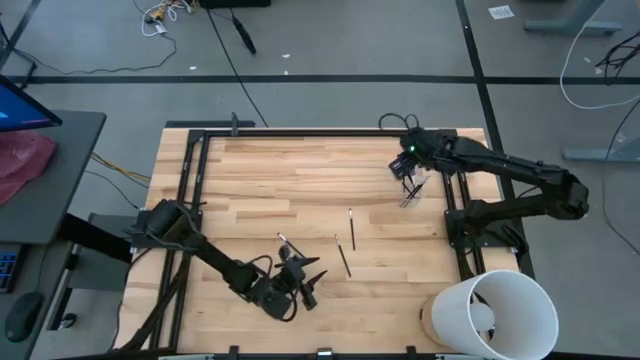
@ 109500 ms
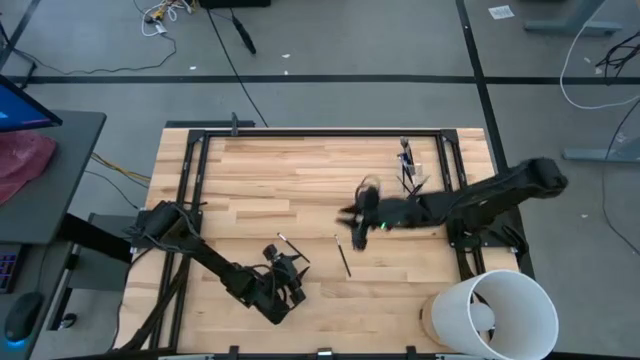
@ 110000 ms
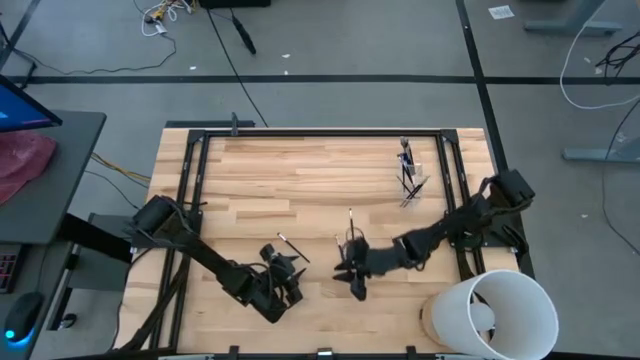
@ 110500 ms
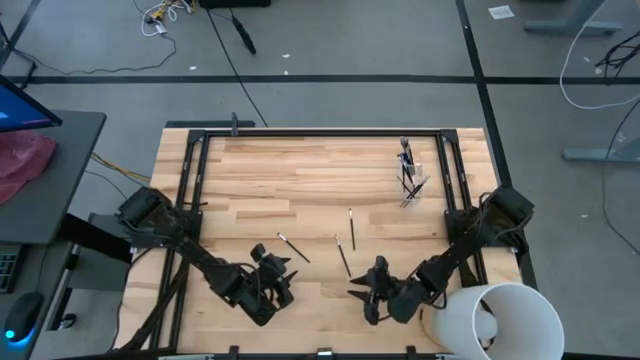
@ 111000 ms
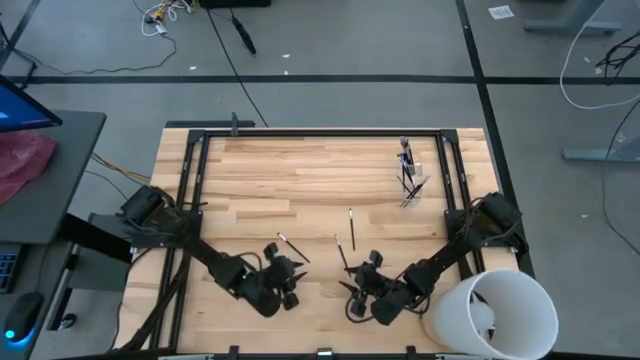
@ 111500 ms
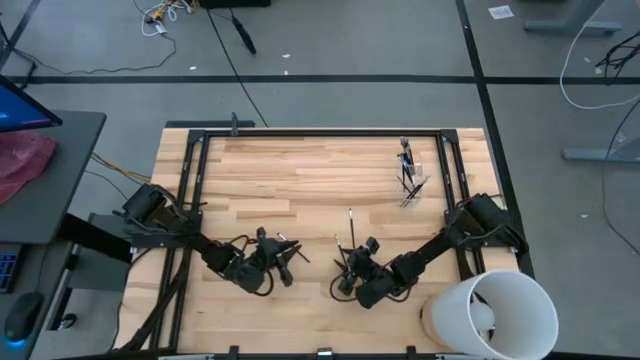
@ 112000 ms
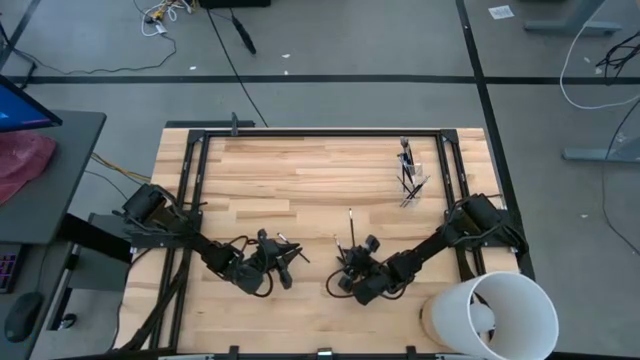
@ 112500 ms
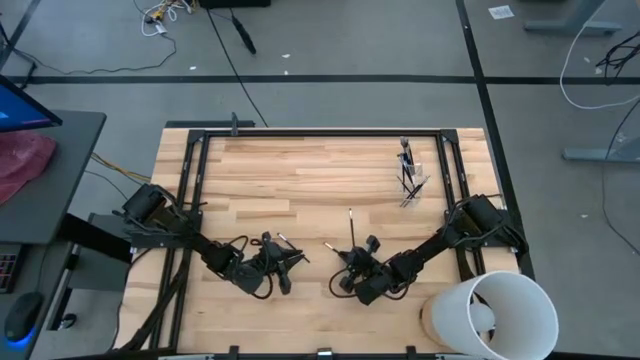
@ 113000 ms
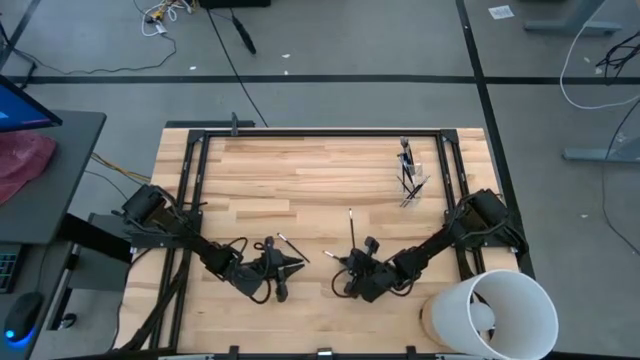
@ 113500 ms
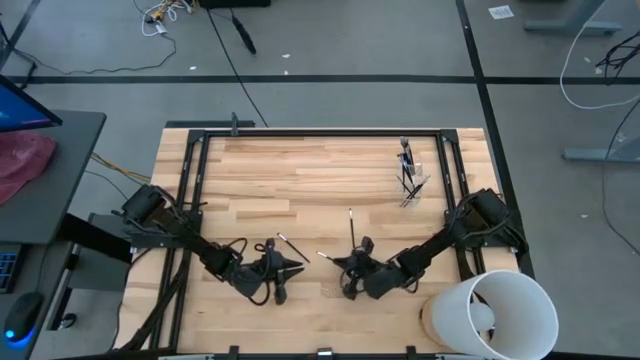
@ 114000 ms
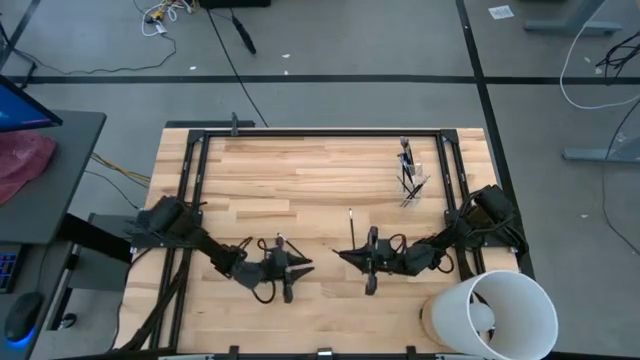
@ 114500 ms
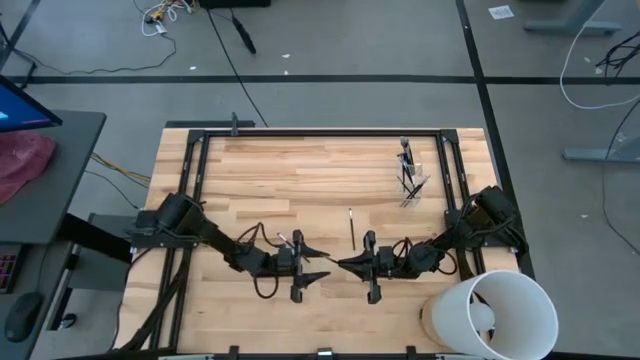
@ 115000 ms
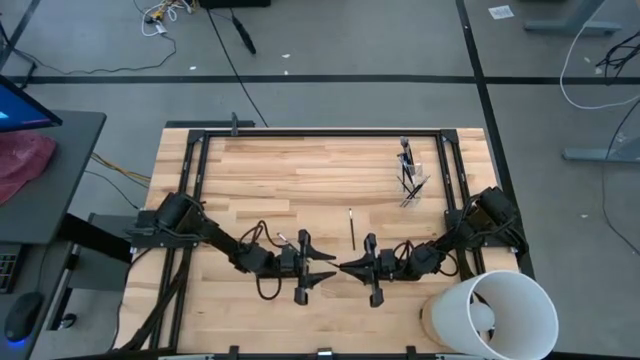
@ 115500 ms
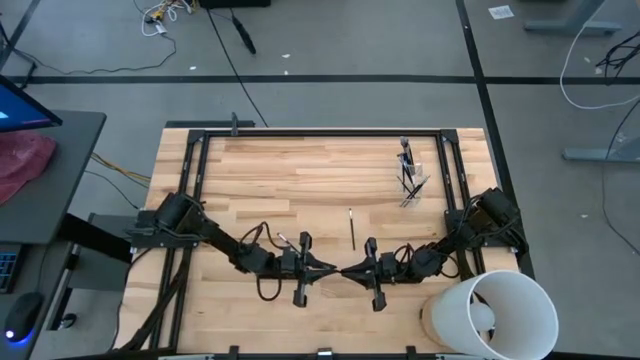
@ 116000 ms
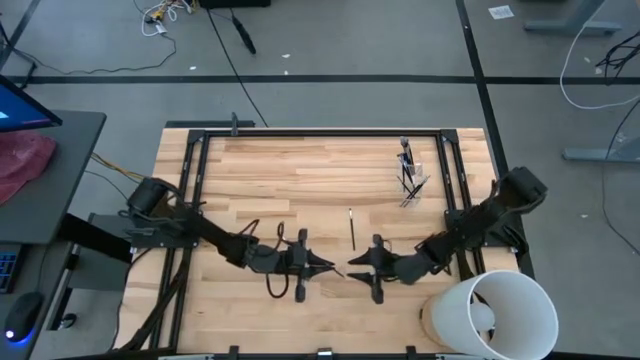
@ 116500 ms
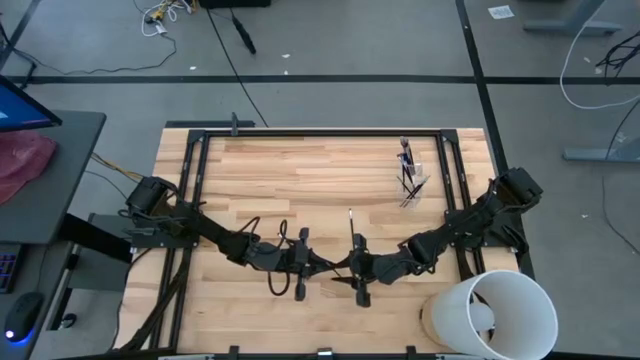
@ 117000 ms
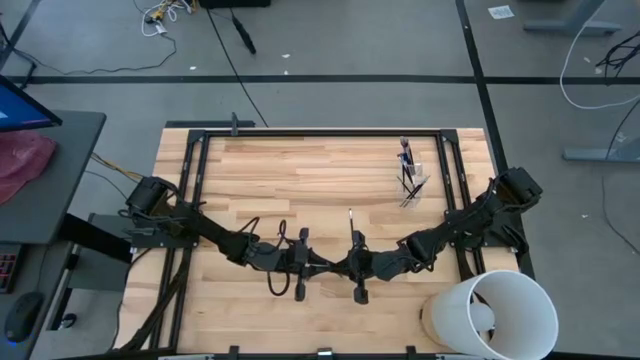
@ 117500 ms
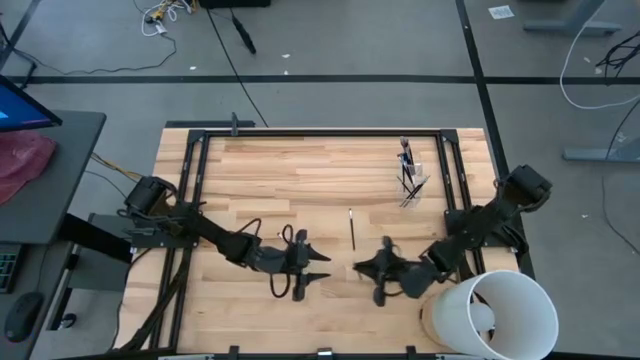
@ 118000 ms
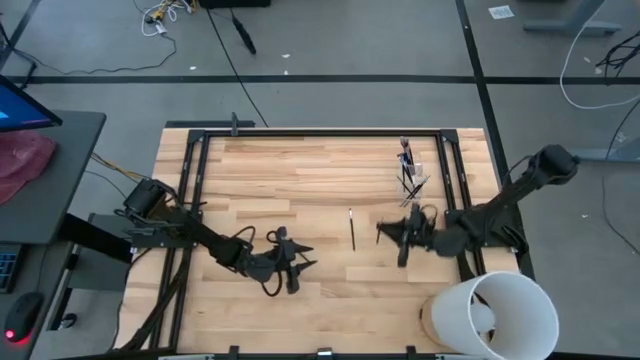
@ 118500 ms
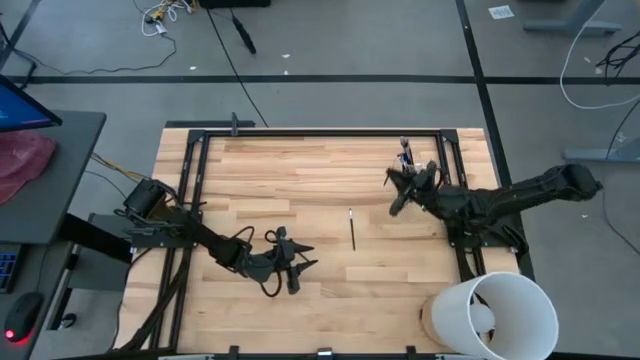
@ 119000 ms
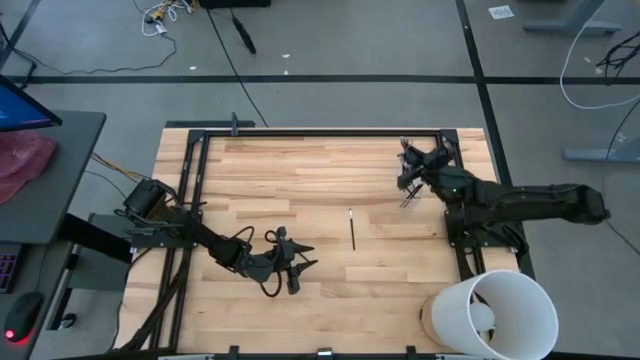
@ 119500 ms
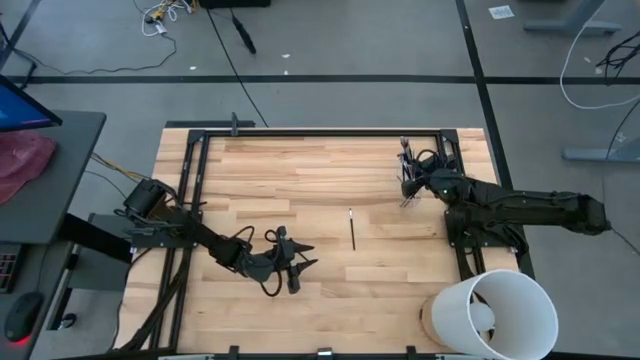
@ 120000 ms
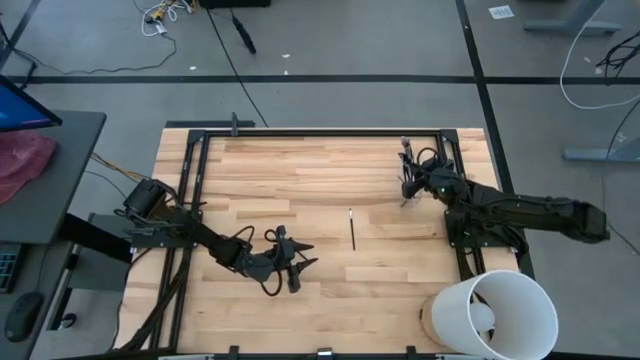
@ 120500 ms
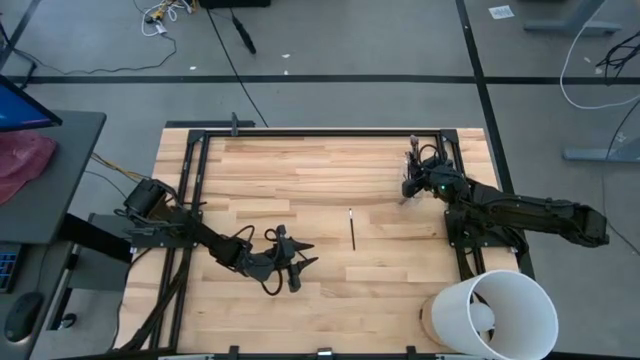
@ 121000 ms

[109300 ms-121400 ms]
Task: Put items in baskets/containers
Put the eyeshadow brush into the transparent organizer

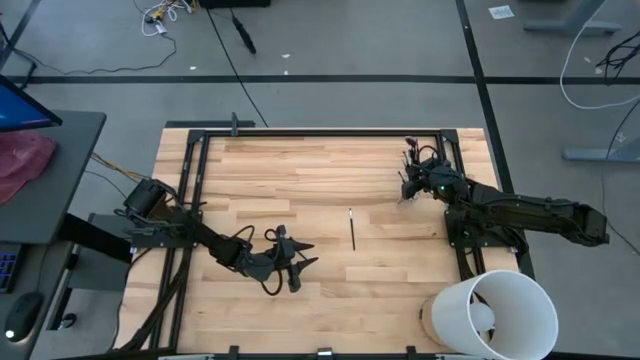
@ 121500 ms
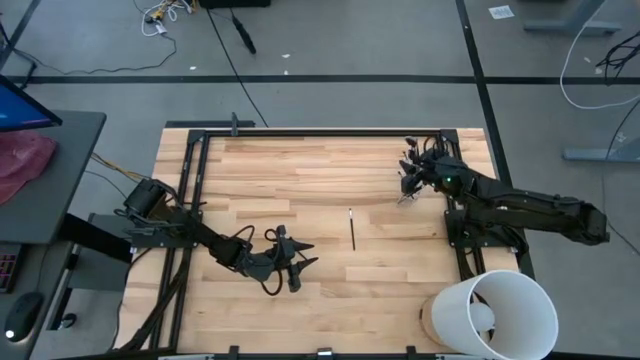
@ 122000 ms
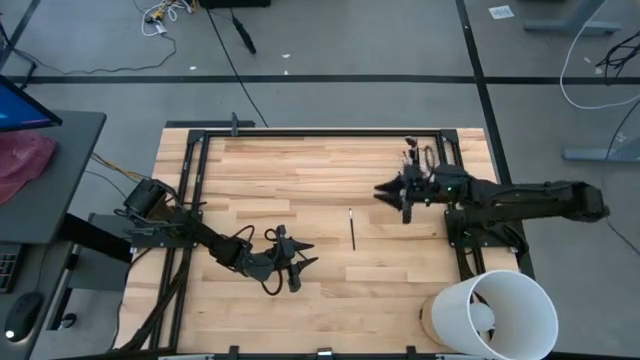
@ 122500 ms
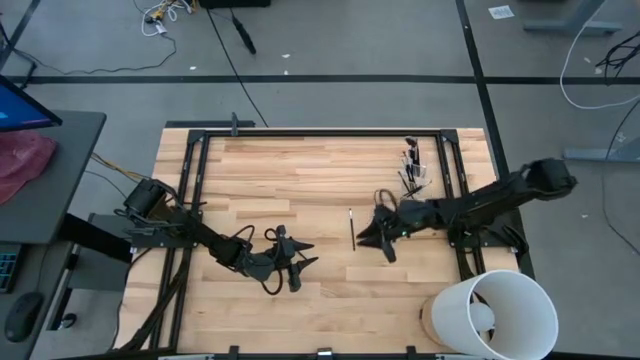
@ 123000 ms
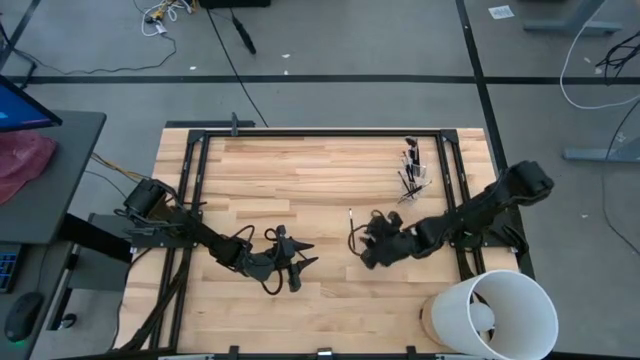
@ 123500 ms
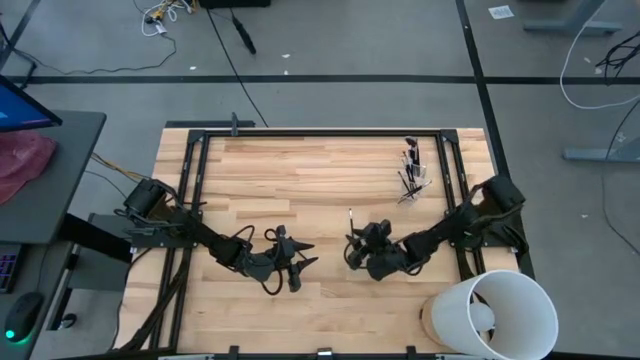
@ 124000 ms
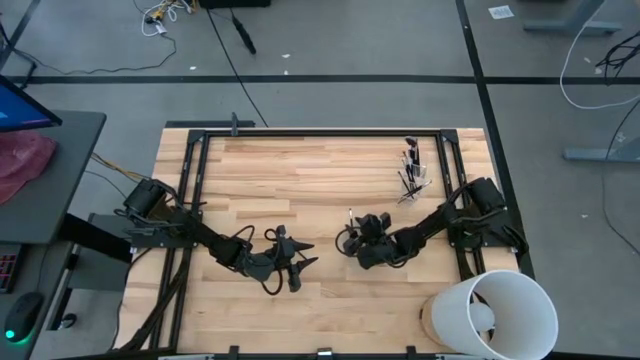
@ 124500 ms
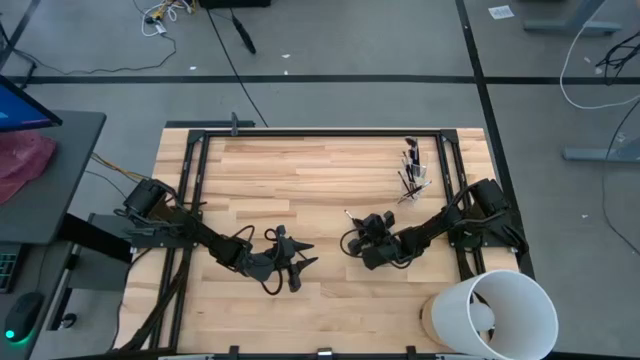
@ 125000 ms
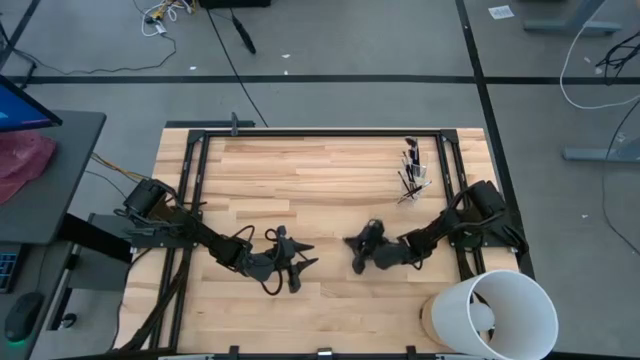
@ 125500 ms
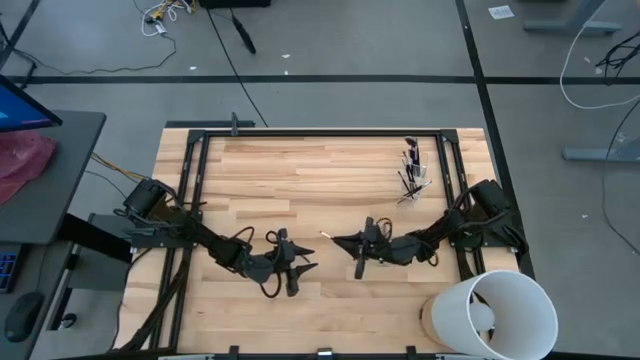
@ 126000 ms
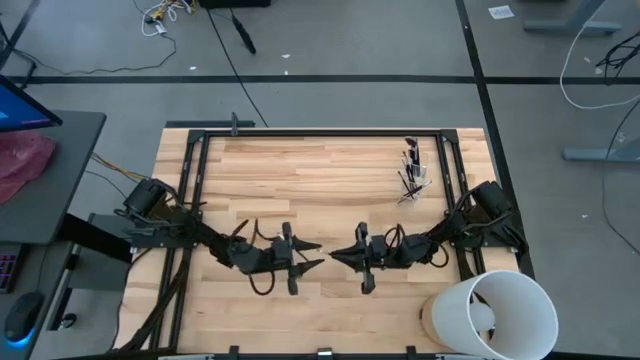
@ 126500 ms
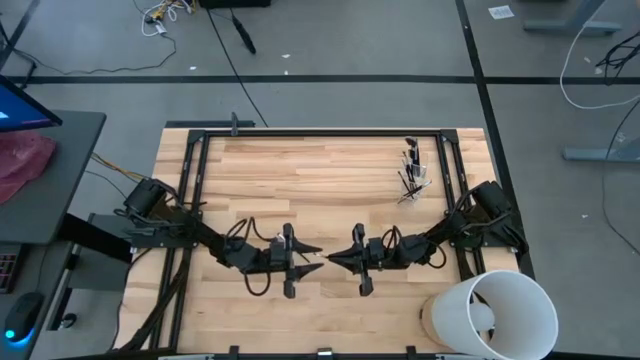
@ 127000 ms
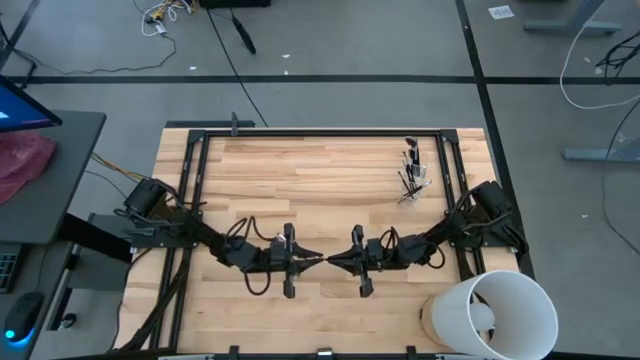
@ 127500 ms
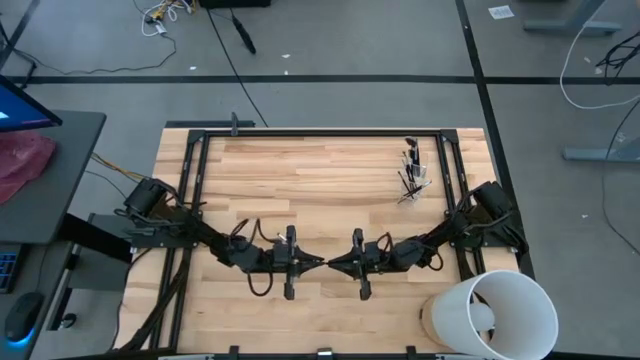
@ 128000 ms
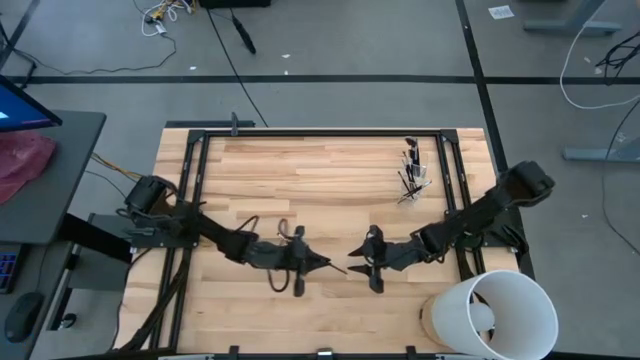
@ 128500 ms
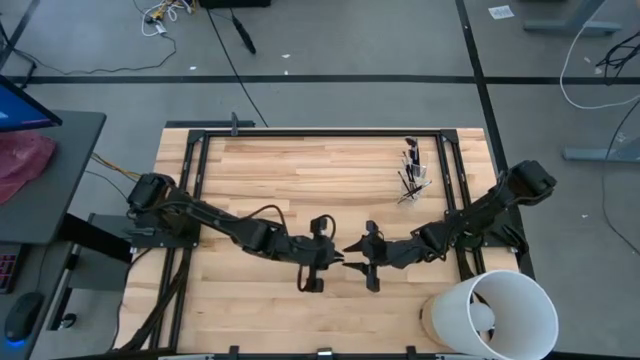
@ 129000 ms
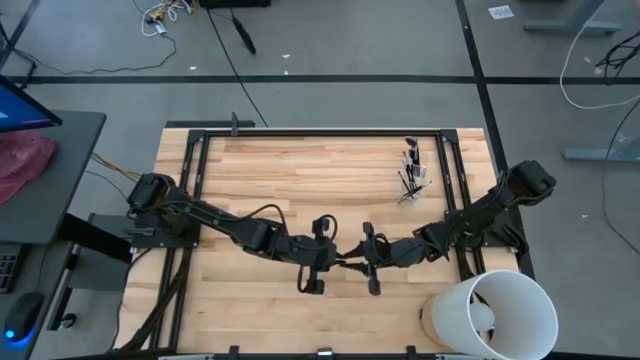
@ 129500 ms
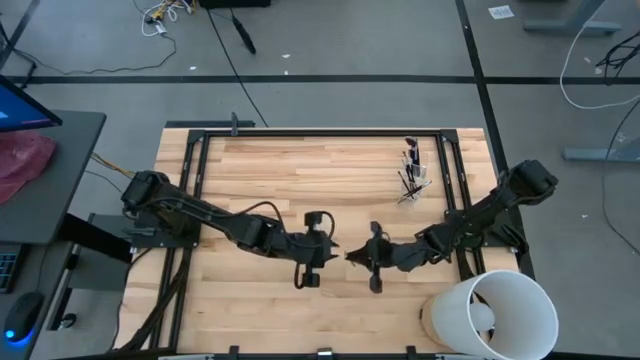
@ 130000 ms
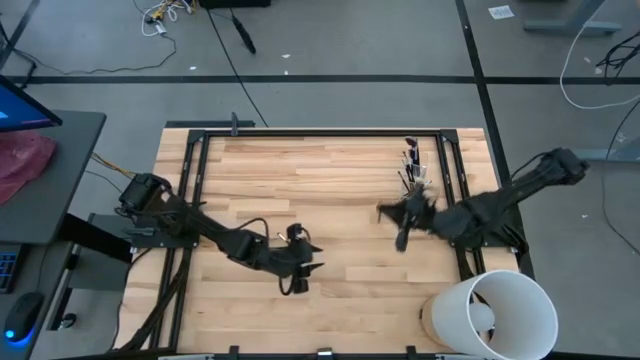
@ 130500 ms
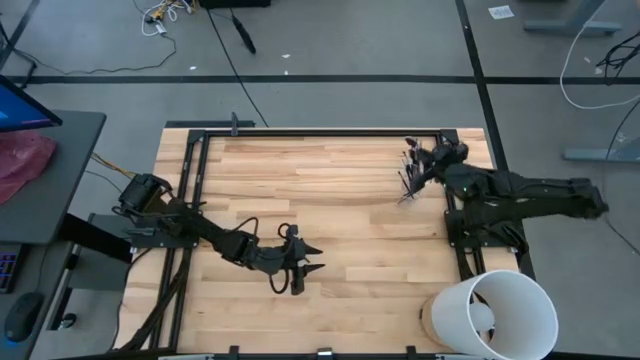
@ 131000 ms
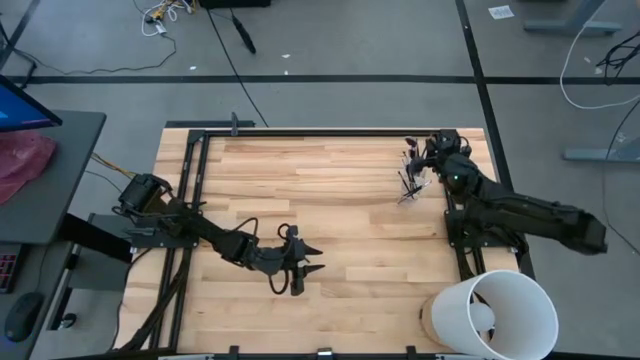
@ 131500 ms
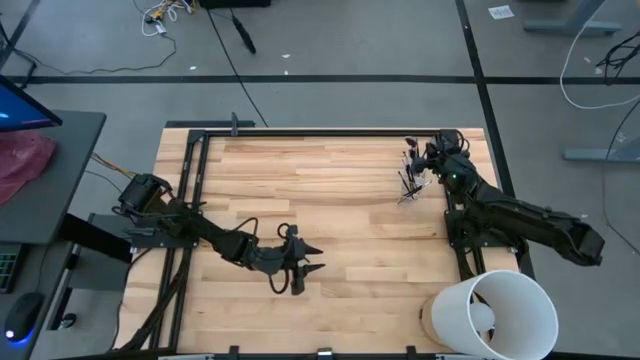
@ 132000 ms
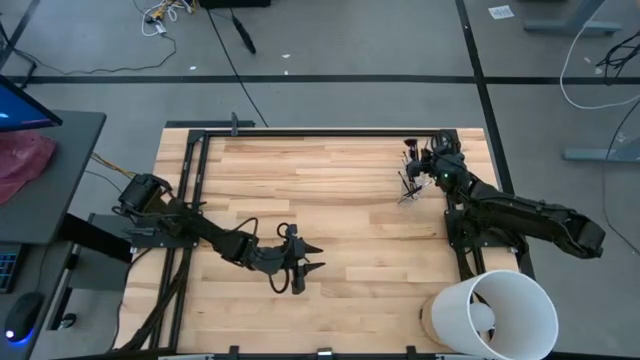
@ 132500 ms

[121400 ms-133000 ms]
Put the eyeshadow brush into the transparent organizer
